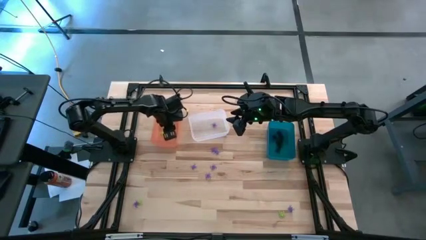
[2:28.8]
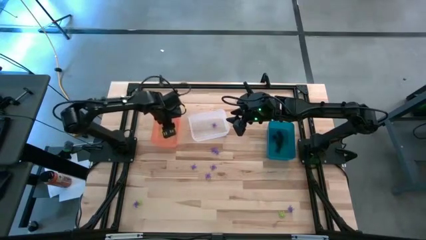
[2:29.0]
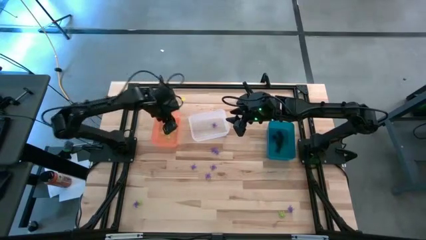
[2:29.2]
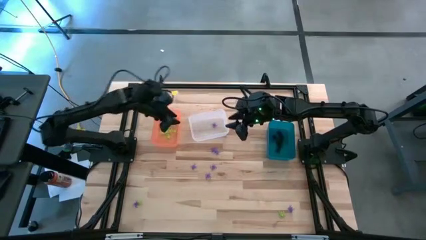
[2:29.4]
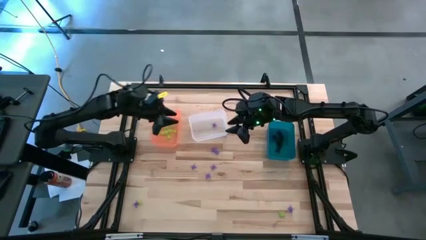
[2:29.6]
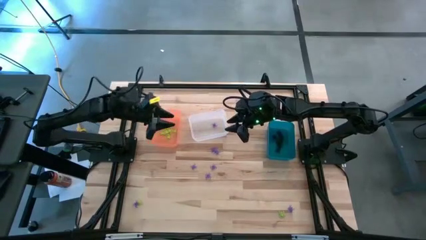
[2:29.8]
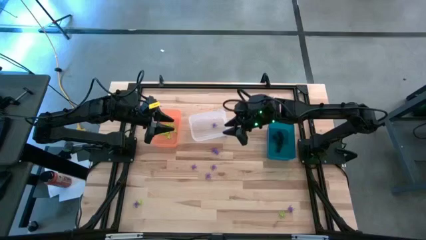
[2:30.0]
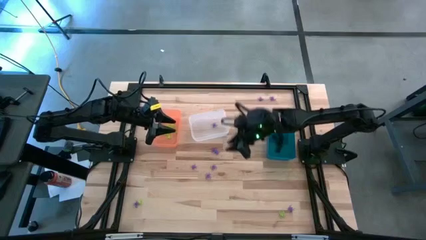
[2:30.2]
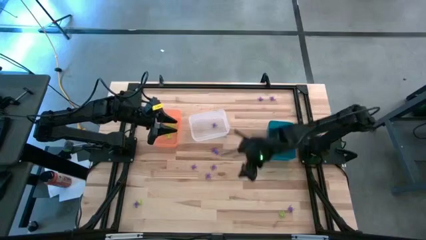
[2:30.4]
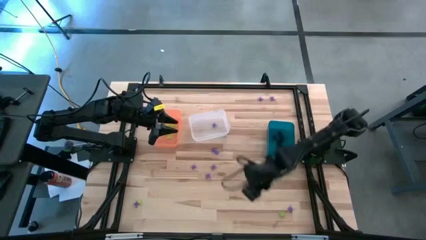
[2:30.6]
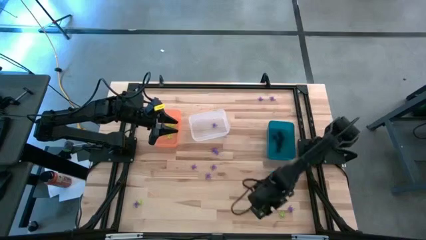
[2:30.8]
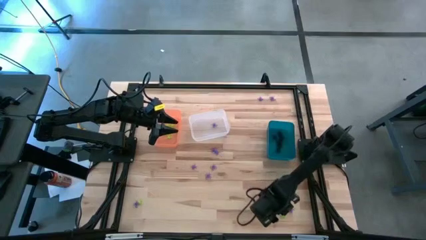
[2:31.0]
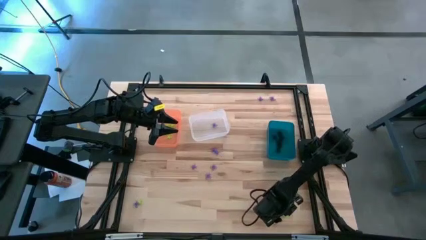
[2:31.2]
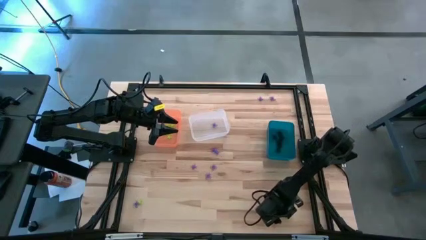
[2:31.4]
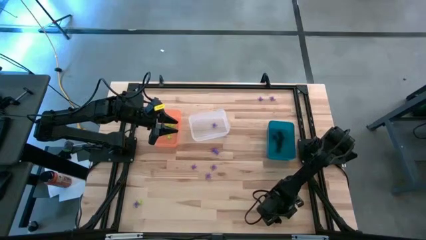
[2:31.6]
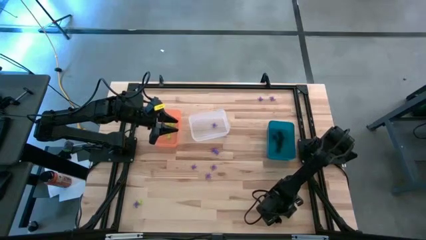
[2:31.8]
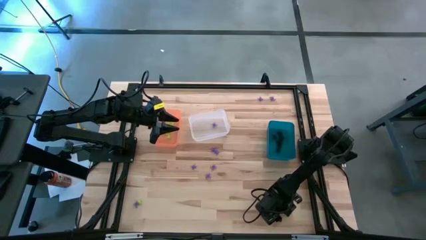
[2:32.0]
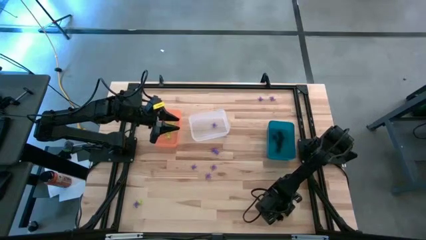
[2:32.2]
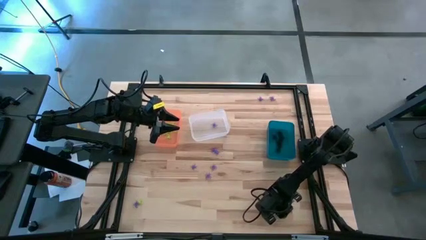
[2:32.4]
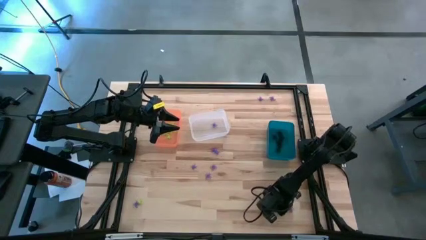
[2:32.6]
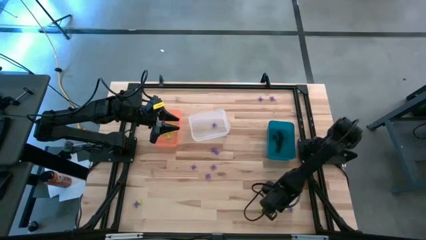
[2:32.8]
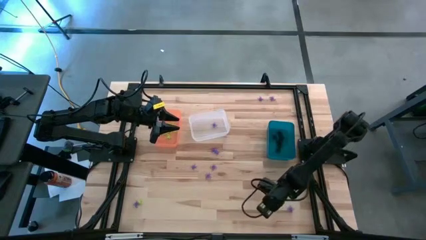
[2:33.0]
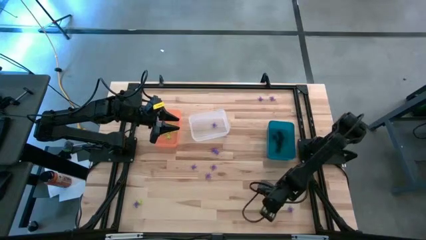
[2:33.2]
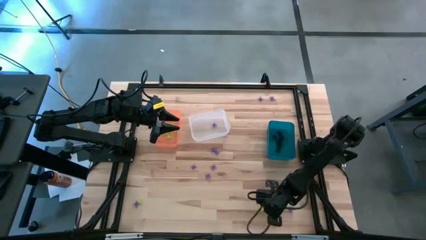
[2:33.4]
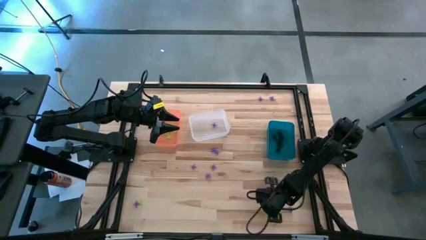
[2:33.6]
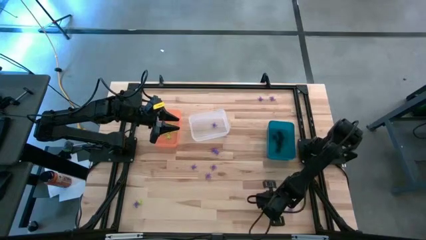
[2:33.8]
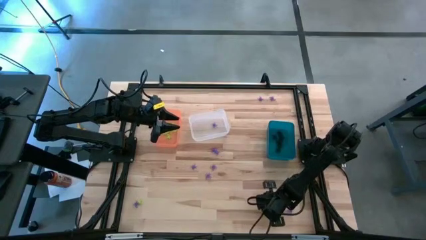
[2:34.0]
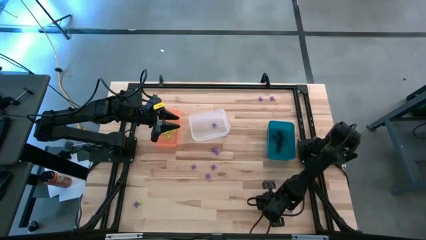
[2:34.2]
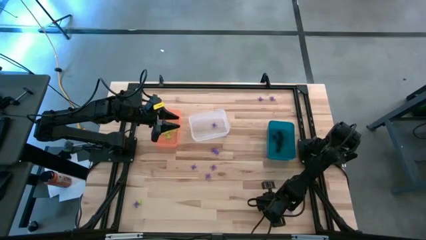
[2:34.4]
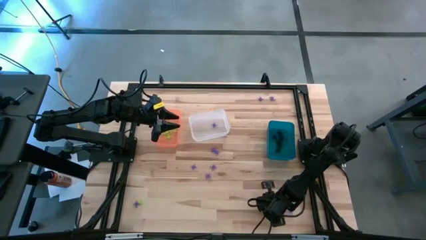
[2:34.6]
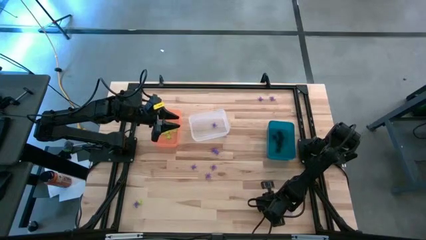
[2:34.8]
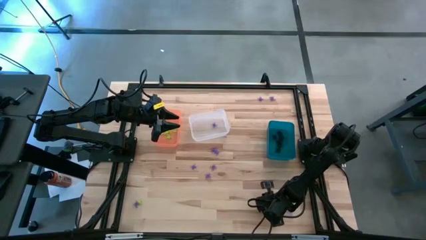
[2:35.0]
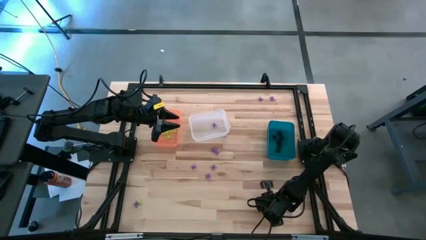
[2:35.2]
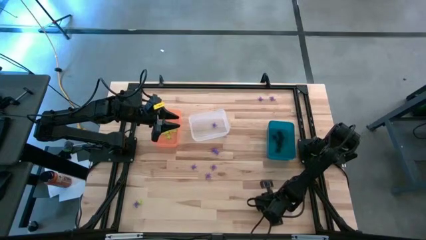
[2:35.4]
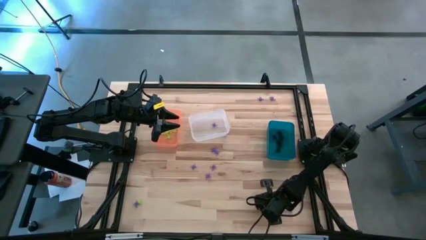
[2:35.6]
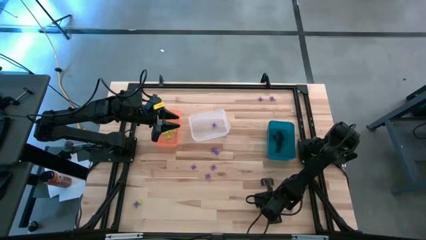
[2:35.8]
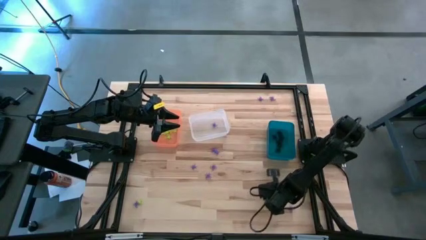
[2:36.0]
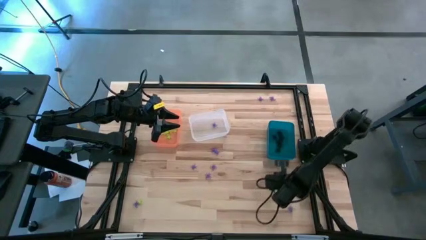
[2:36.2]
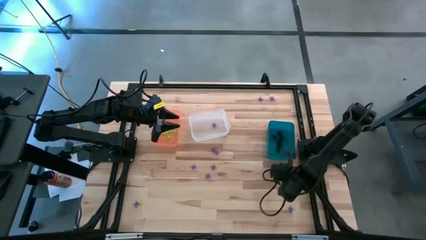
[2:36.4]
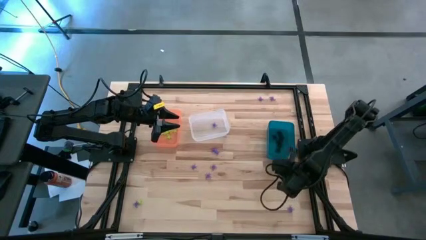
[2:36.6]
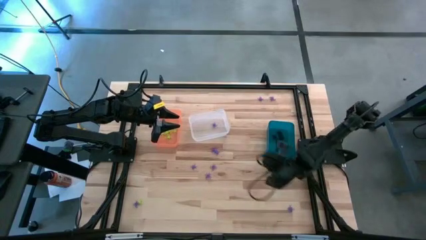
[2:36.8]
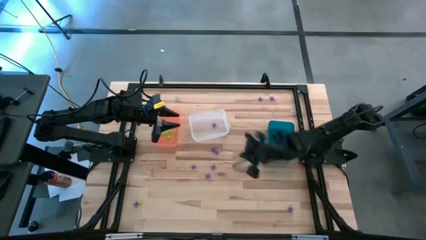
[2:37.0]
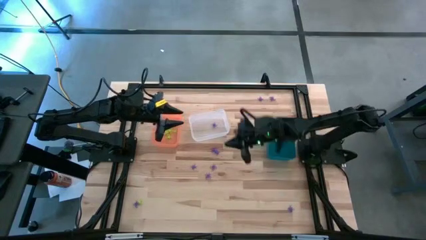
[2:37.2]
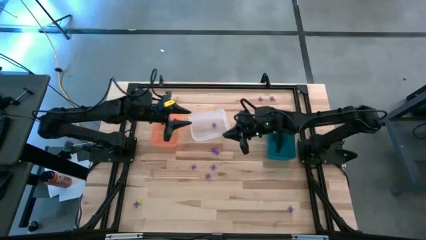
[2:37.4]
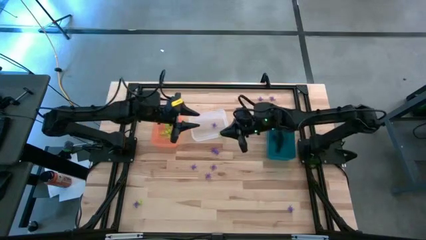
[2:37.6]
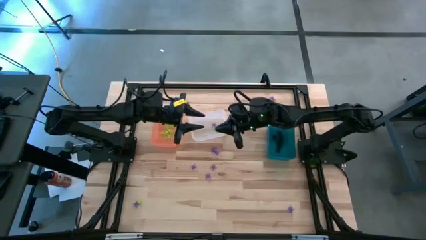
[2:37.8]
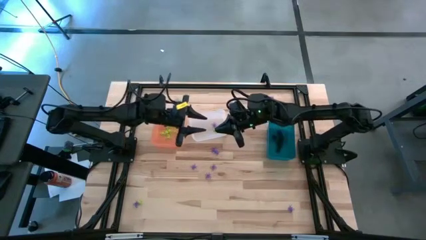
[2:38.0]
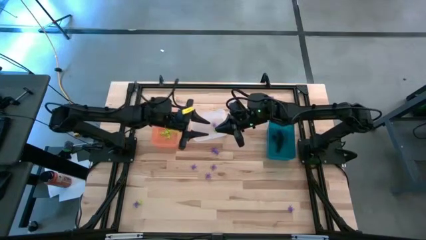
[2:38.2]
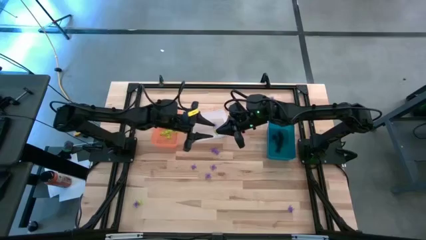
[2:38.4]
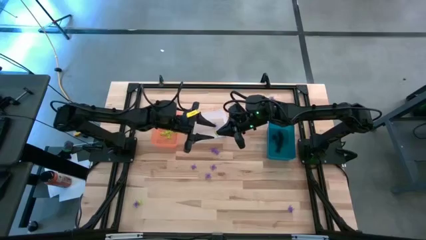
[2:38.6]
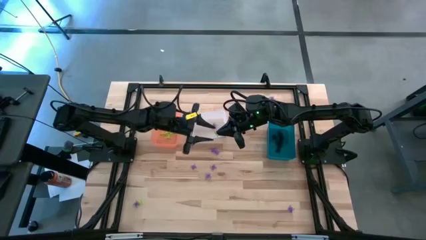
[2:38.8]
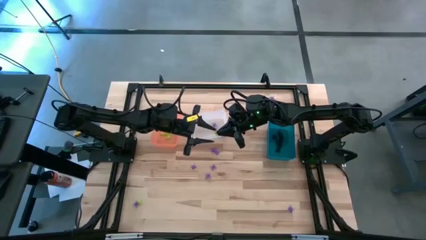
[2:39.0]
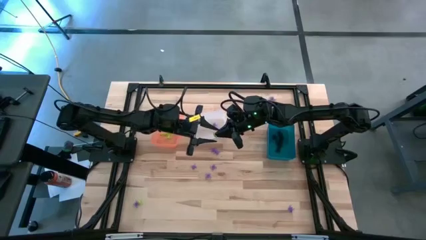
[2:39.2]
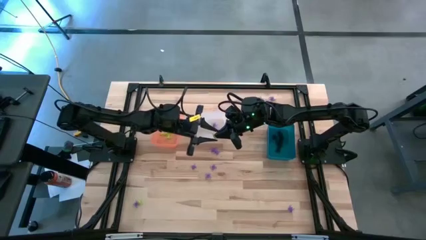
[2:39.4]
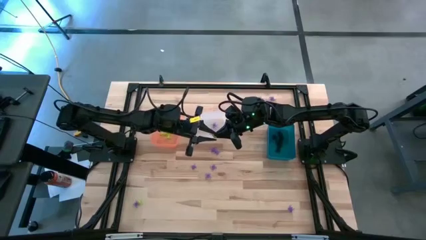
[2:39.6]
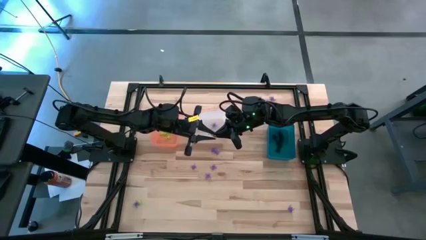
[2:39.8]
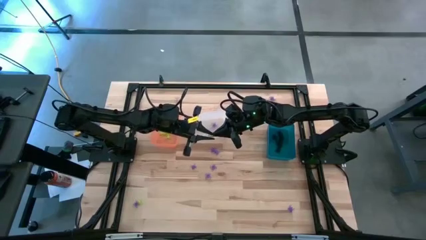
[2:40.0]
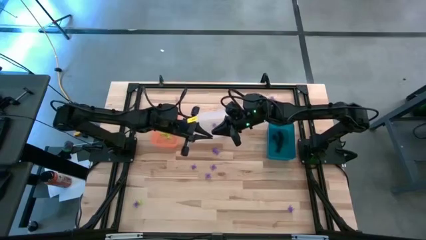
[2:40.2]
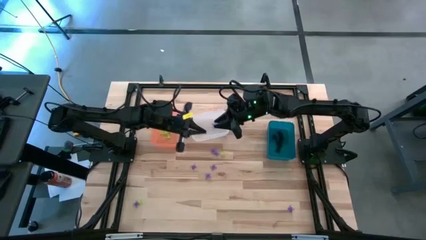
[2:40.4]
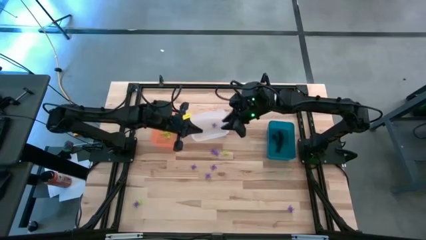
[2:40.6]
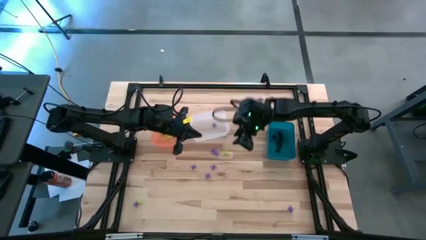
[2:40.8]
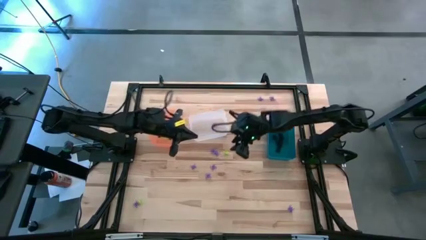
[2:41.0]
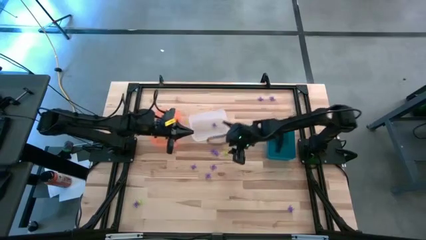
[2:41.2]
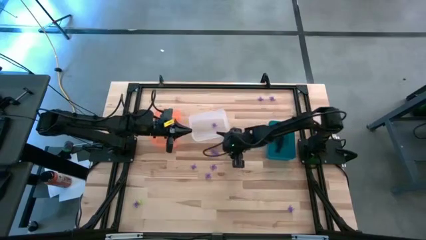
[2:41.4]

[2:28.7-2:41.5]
Task: Sort Halloween decoration
Put the green spider toy into the orange bin

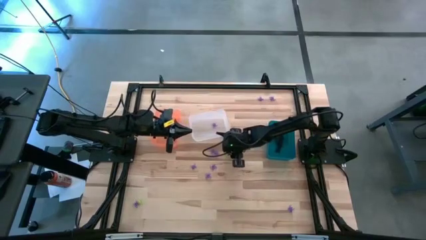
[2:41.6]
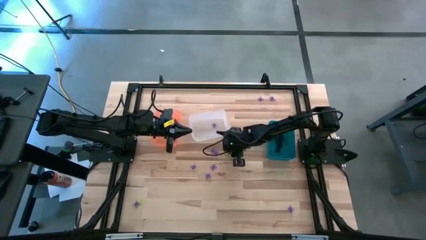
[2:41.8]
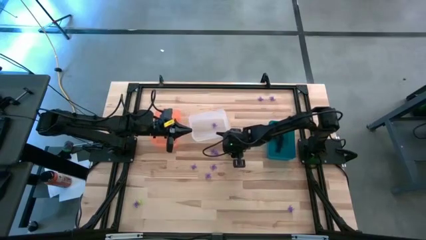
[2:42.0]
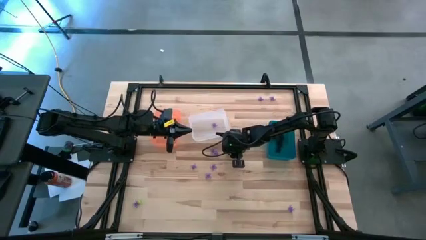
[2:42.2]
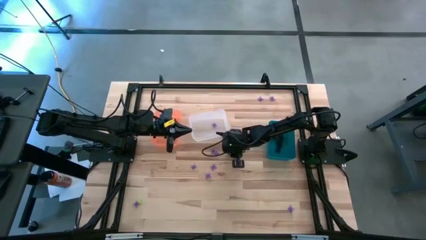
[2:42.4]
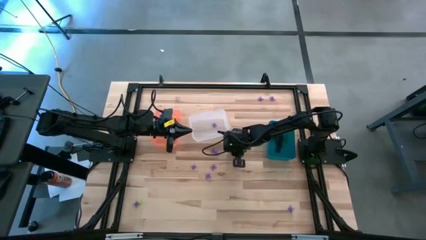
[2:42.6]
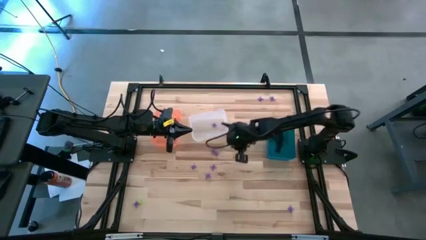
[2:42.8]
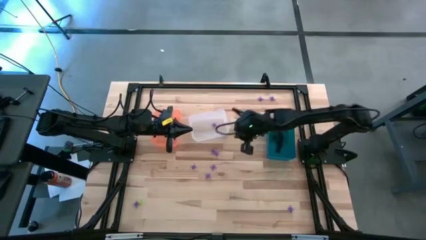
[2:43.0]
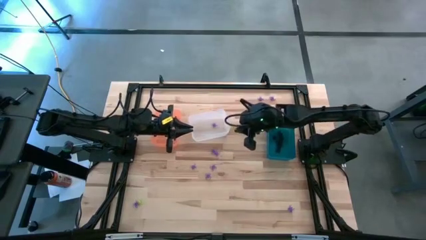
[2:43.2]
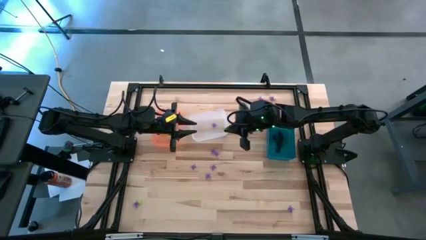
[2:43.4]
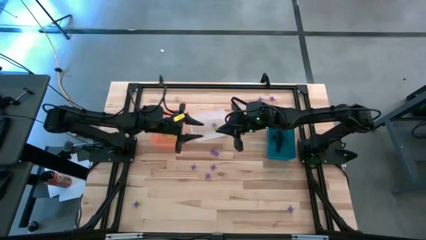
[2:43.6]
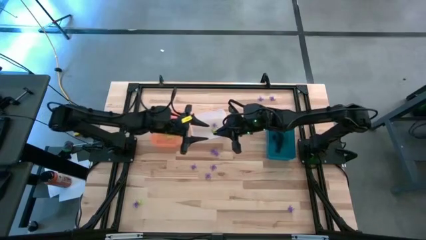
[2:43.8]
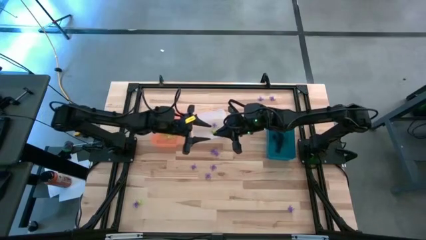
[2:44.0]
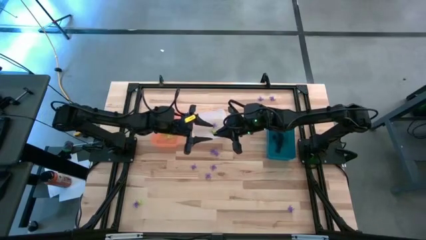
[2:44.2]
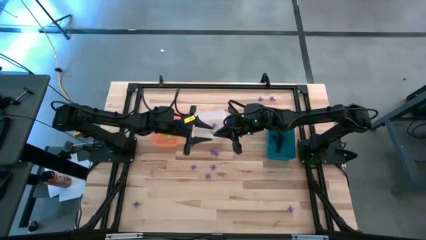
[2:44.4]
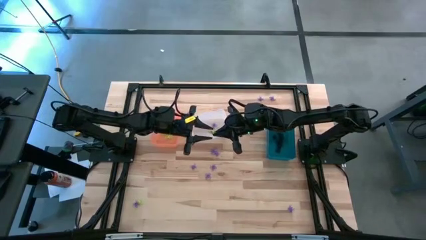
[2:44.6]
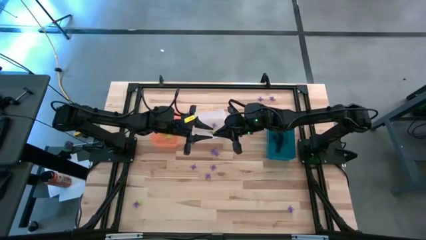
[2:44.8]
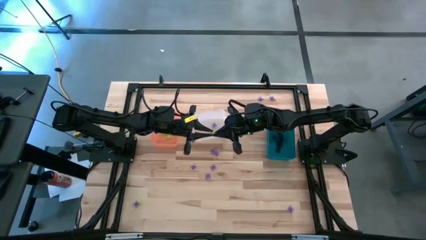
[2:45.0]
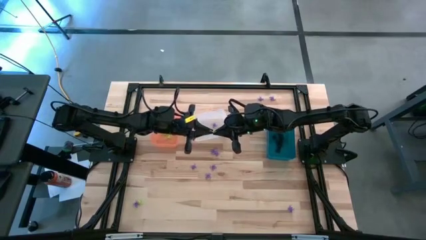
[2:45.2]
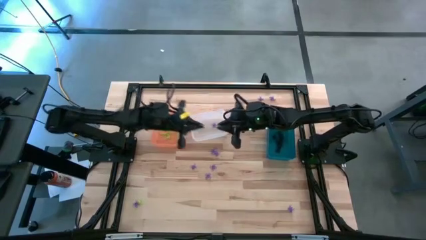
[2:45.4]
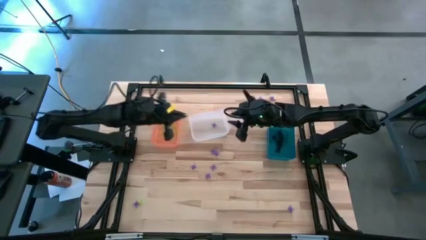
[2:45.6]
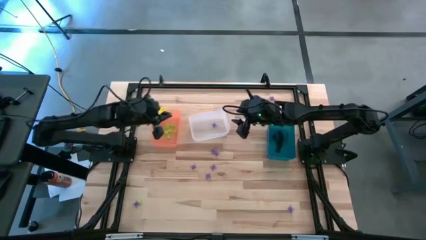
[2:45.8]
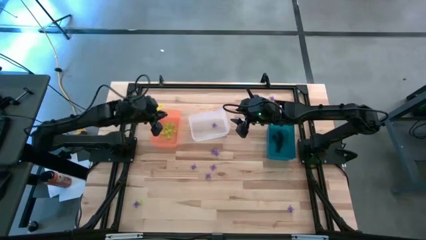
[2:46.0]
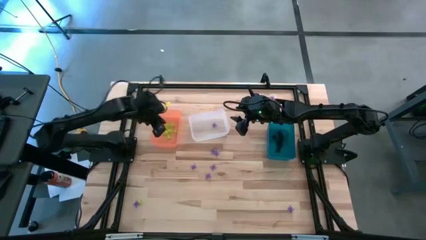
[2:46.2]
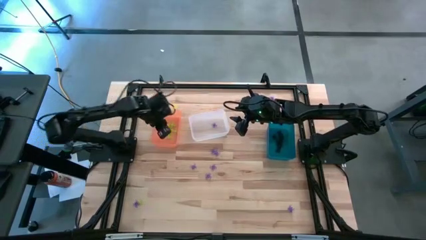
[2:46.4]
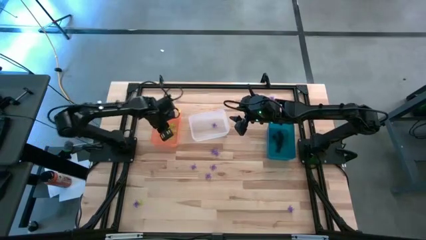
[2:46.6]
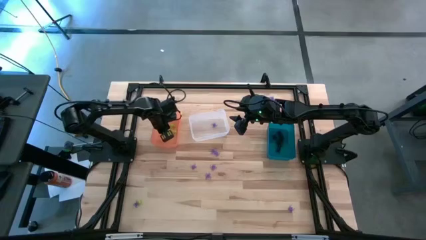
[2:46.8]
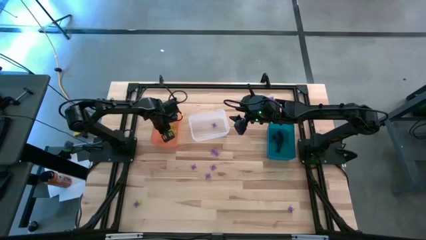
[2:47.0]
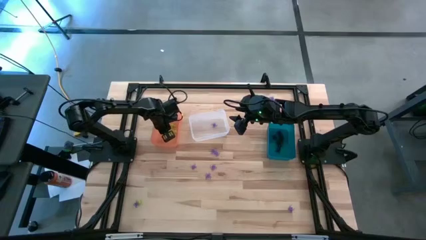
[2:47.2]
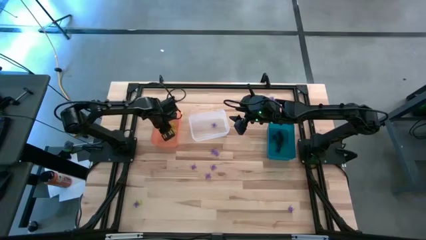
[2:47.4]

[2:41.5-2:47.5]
Put the green spider toy into the orange bin
